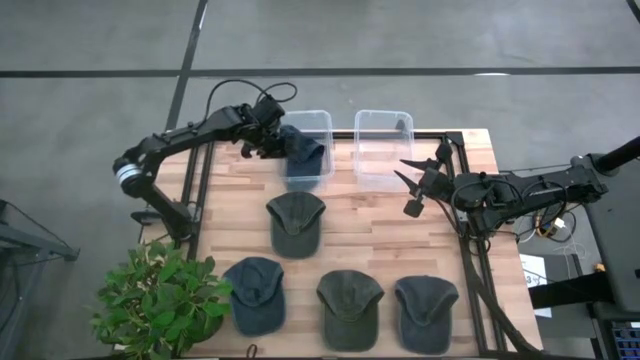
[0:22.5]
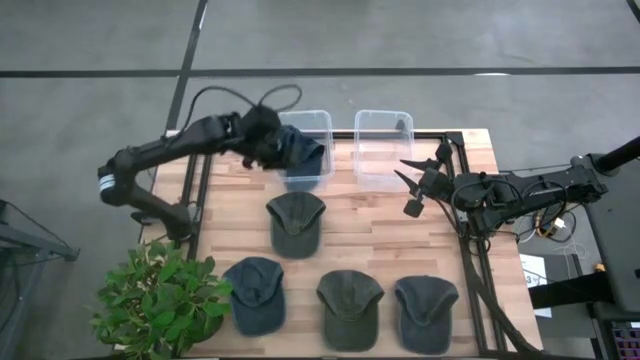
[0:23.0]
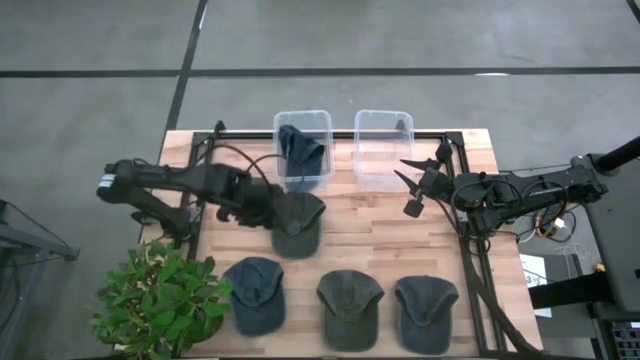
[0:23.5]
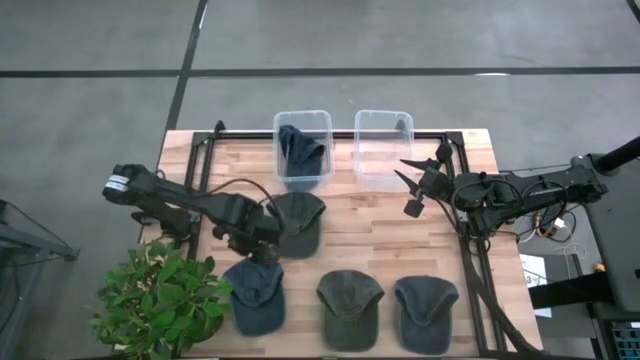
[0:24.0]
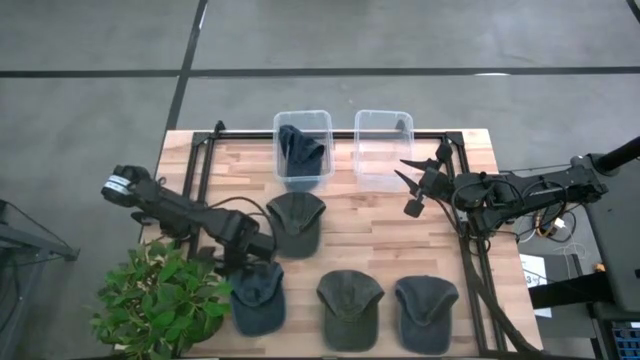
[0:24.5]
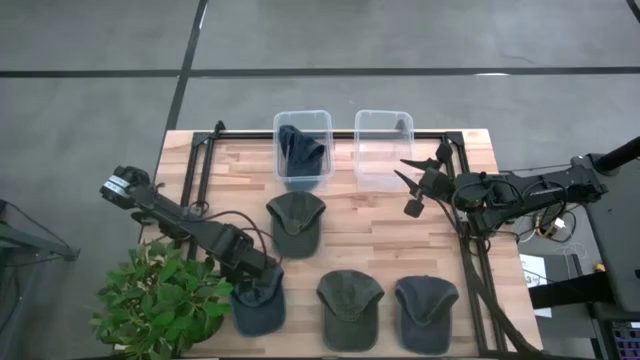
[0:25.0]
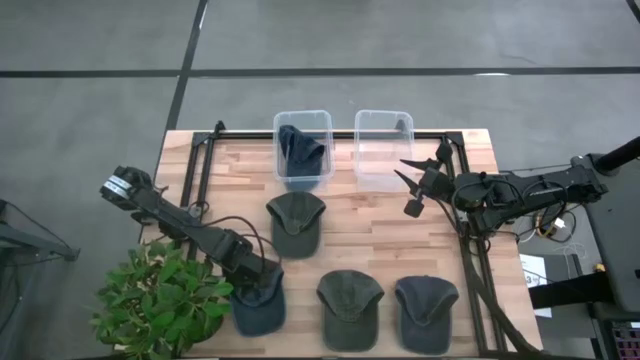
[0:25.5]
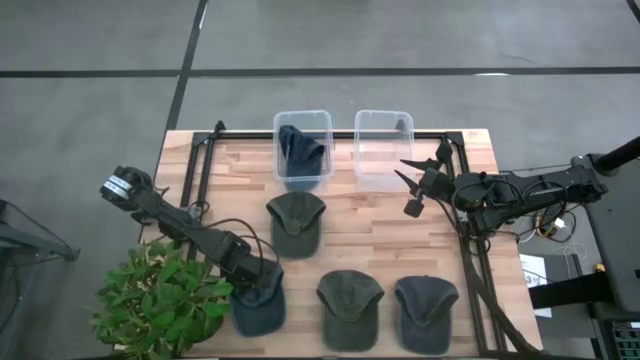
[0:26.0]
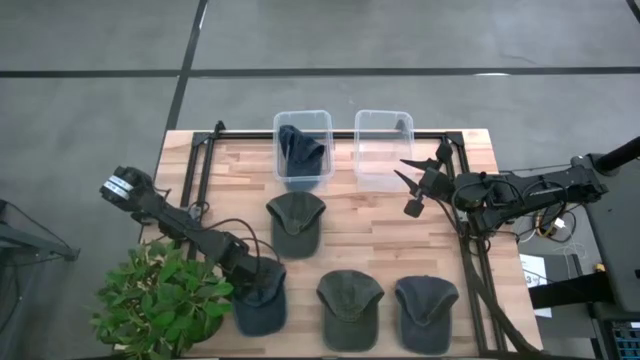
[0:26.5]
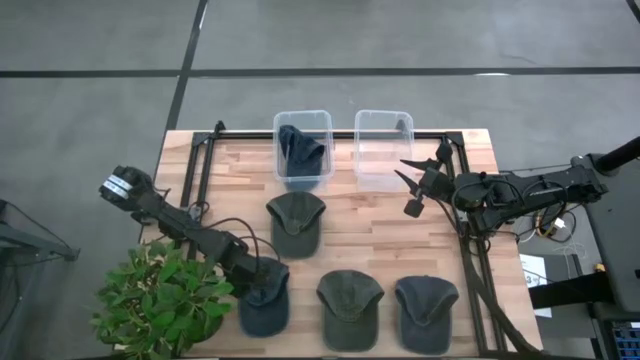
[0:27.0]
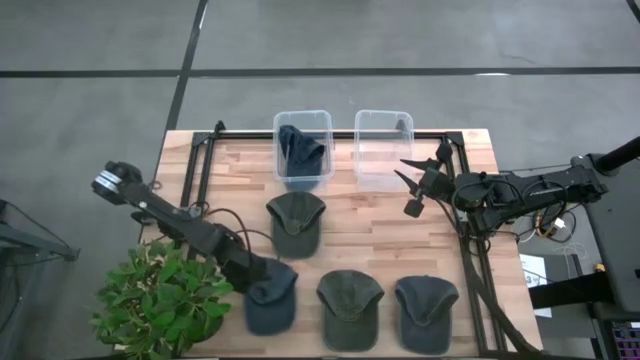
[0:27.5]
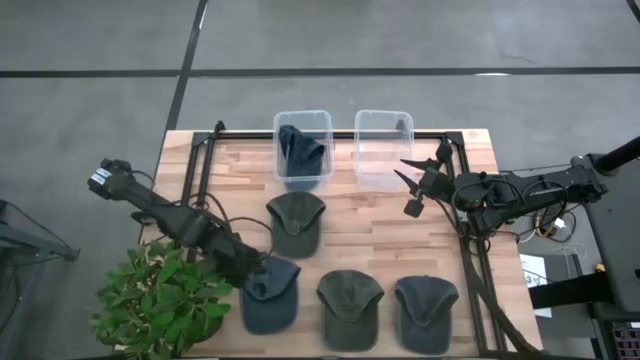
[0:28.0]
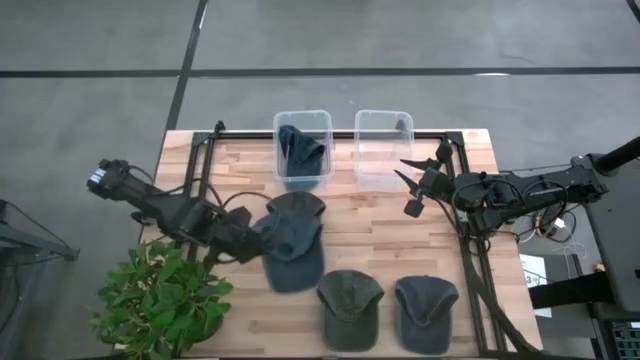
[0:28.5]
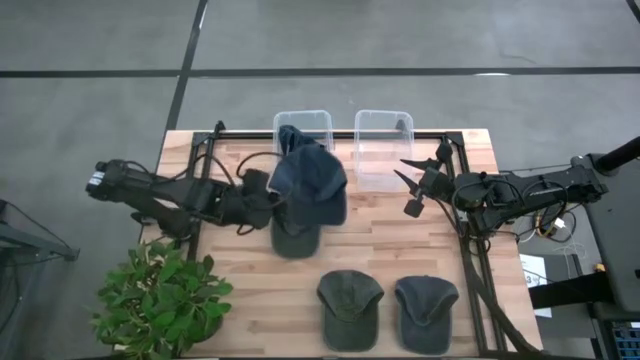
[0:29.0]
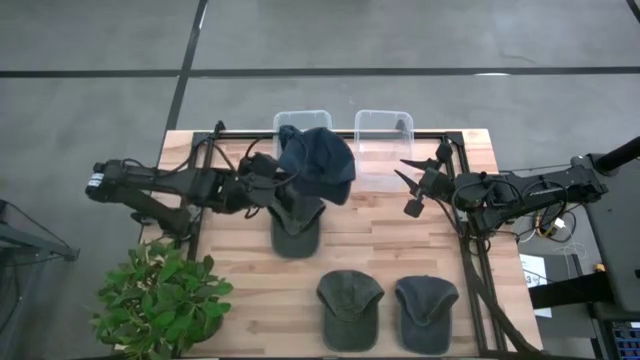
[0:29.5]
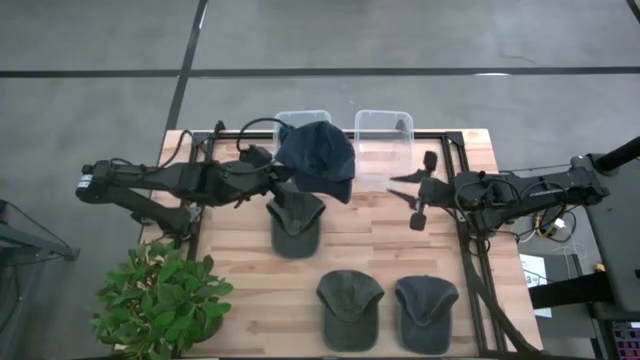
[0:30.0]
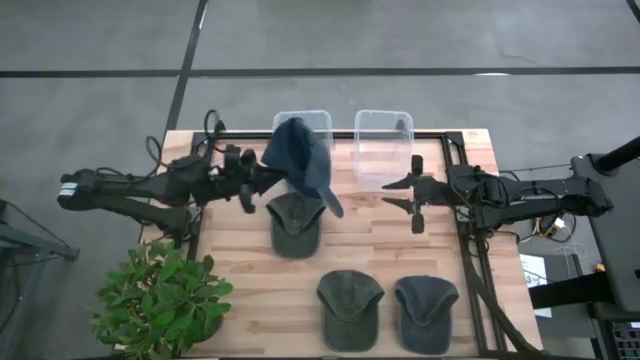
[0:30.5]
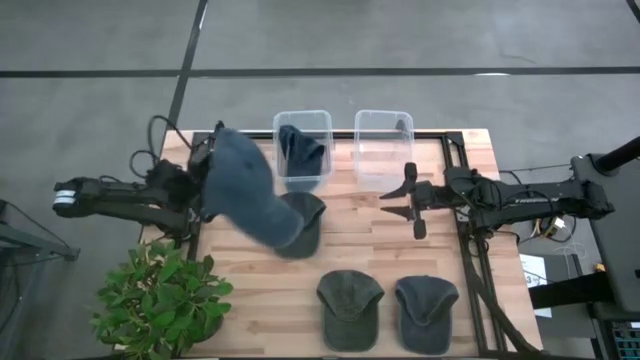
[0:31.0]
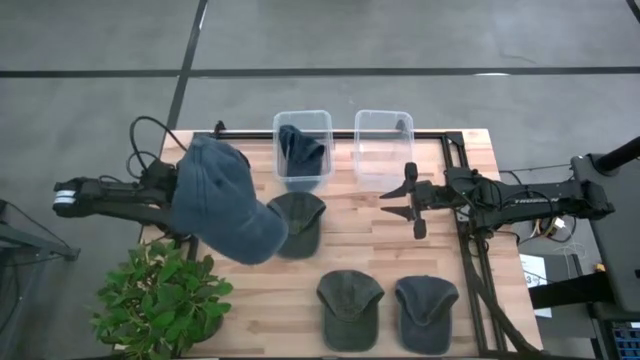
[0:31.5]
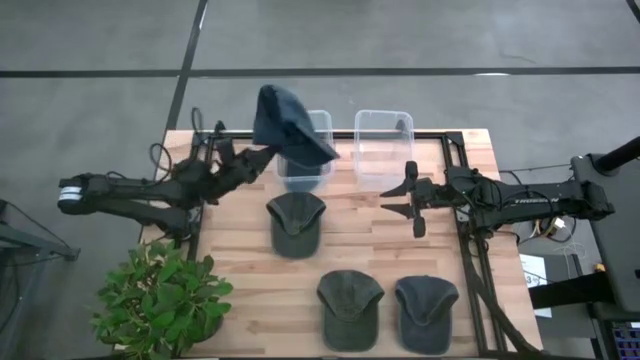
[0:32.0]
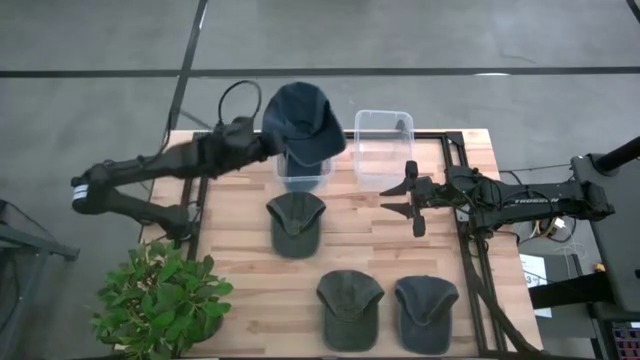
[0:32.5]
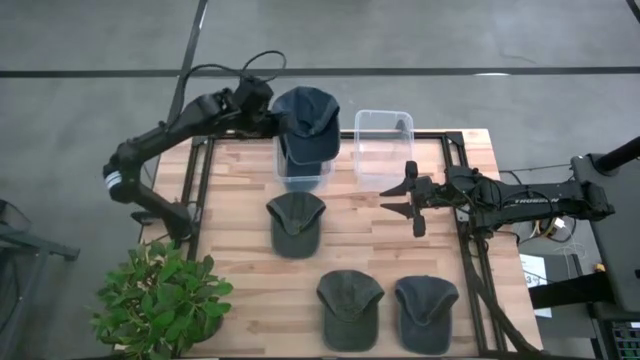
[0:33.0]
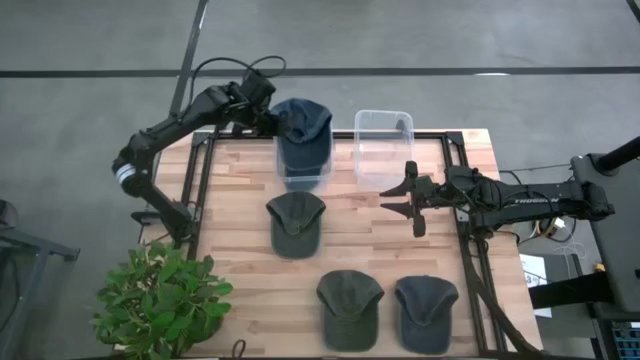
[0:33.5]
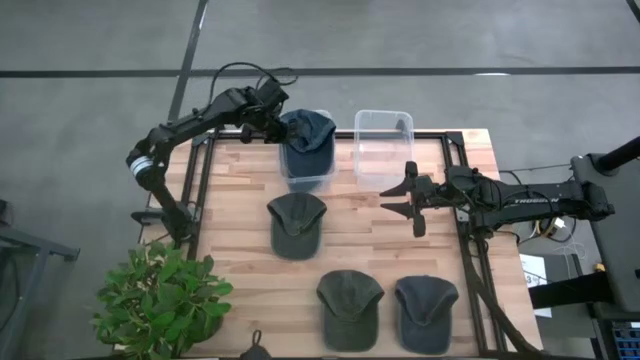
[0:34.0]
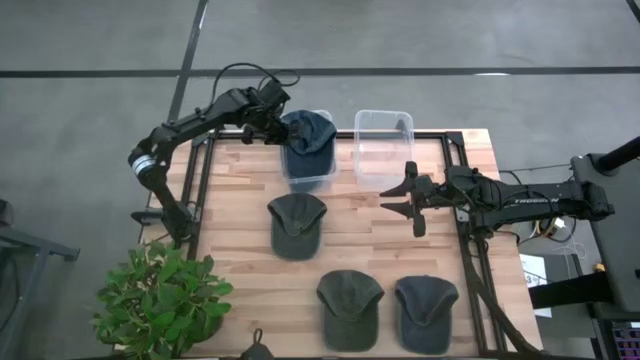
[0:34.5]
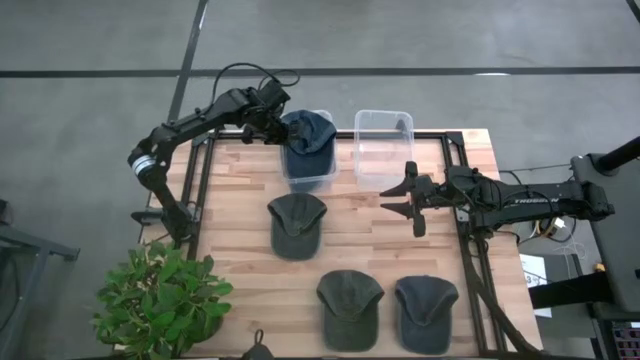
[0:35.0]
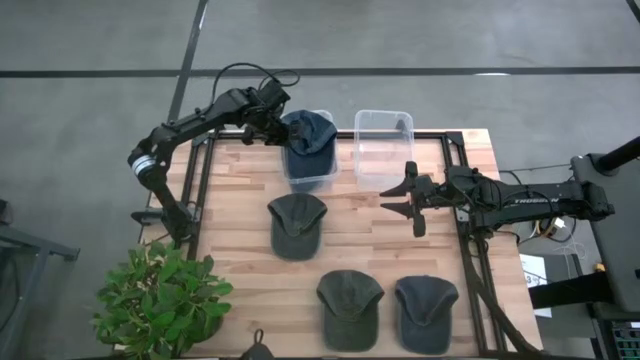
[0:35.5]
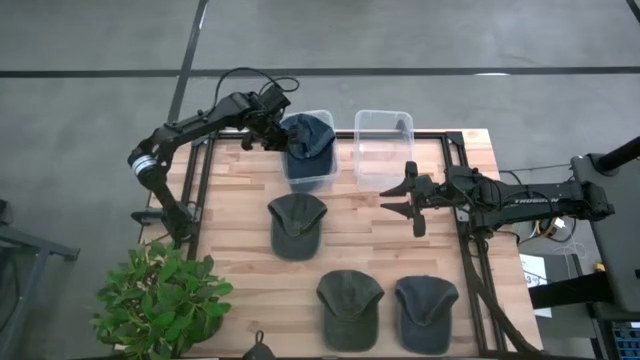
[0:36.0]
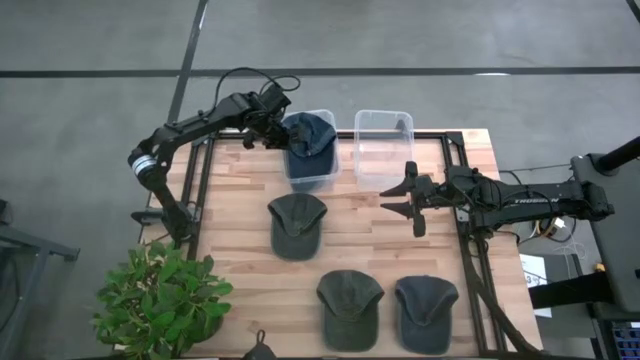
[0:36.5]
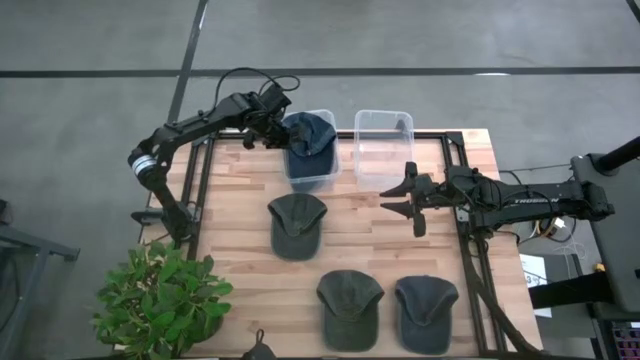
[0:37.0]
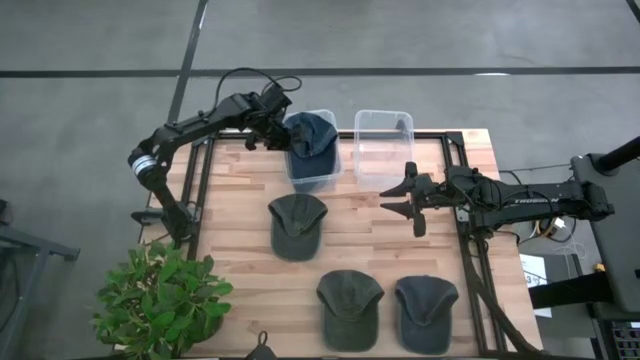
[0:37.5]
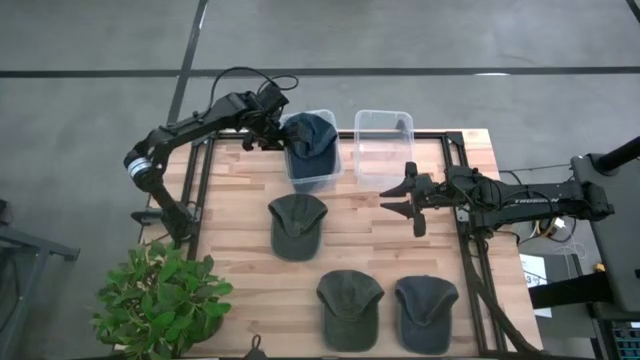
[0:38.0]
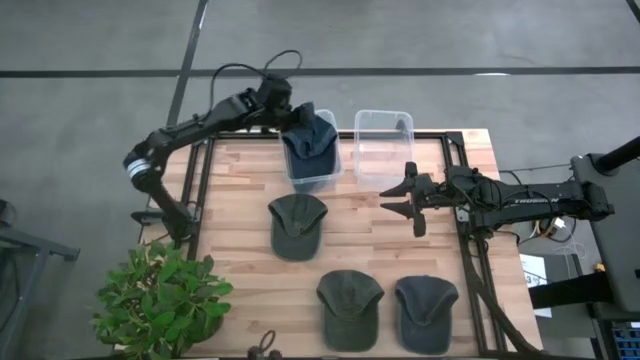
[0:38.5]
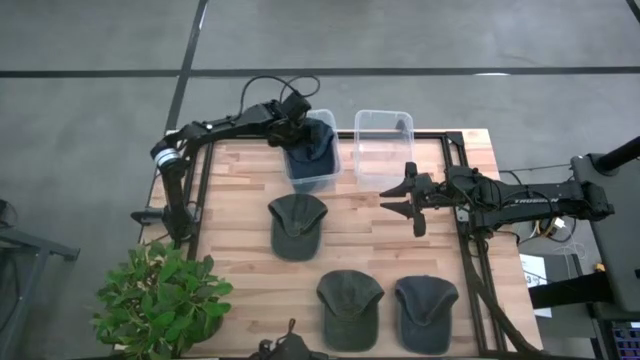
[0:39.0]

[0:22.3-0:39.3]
Task: Pick & Place hat
Put the left blue cap into the left transparent bin

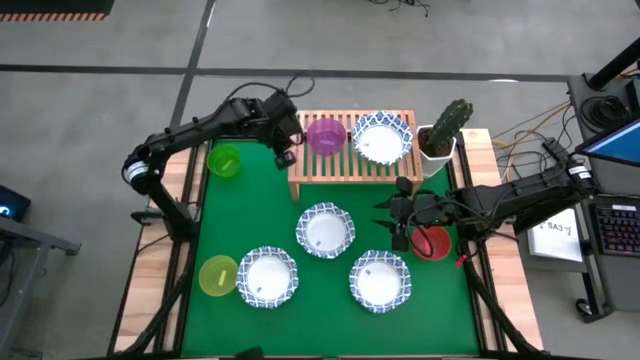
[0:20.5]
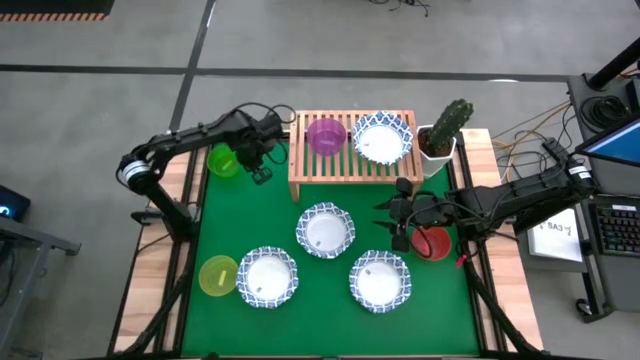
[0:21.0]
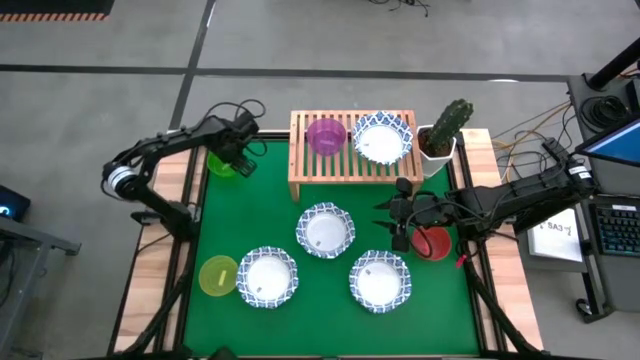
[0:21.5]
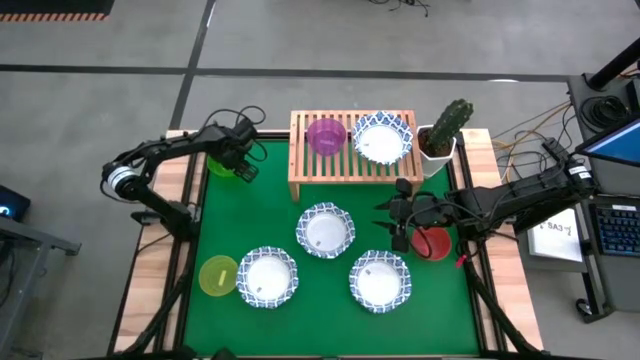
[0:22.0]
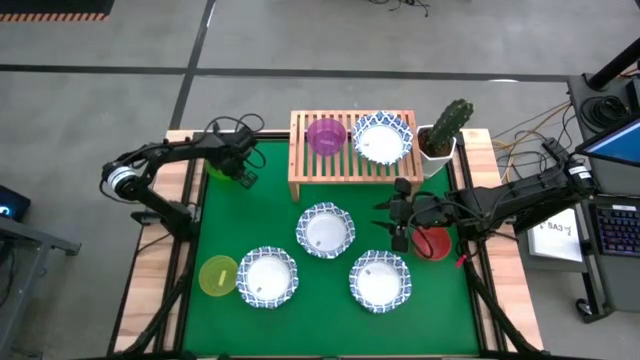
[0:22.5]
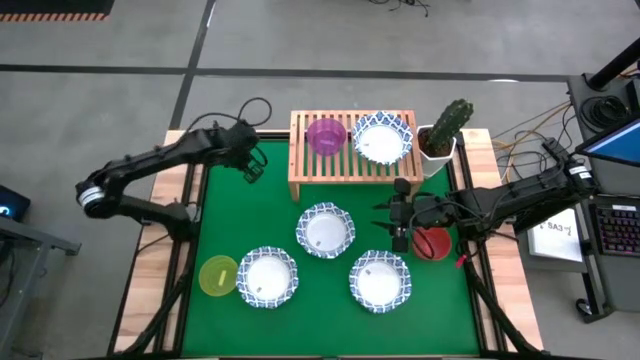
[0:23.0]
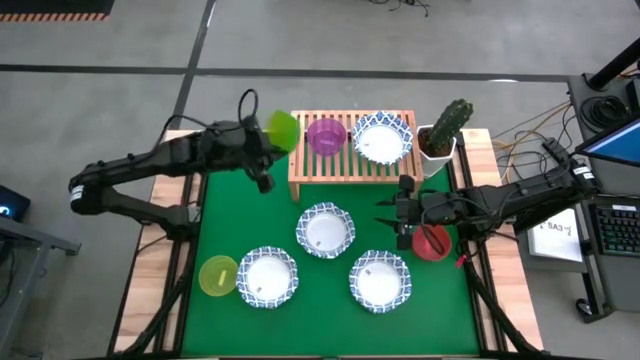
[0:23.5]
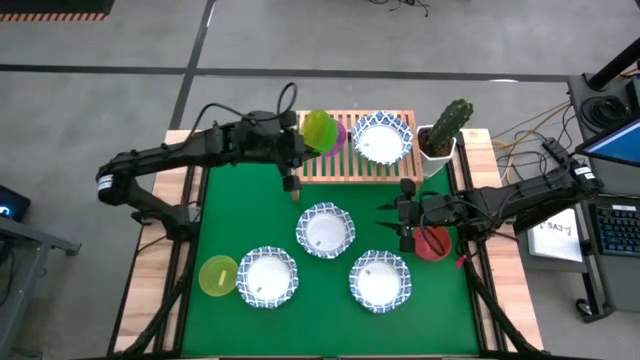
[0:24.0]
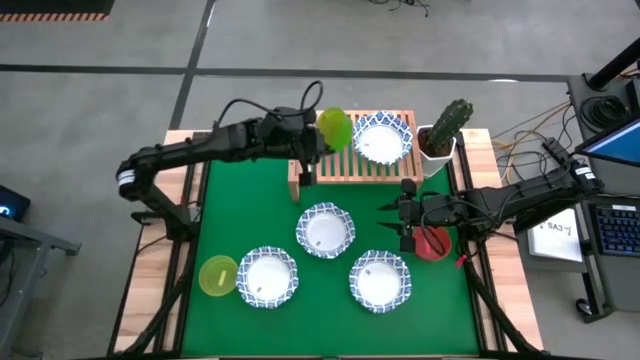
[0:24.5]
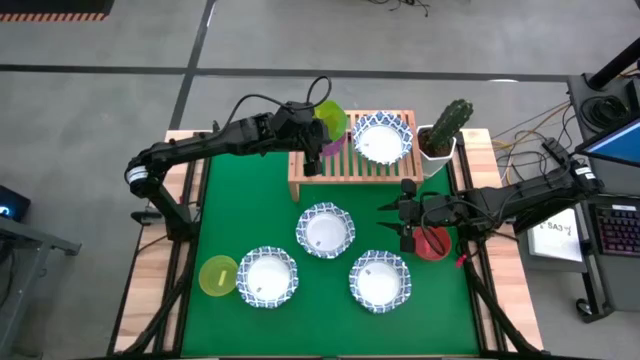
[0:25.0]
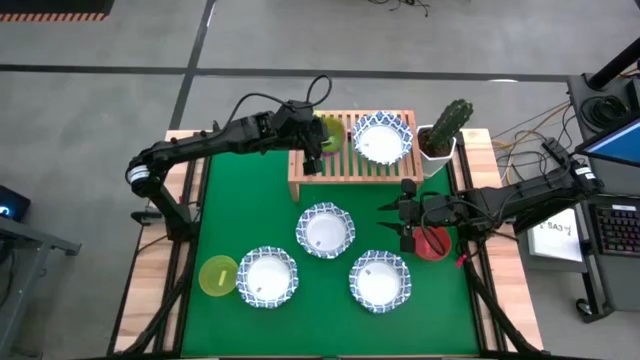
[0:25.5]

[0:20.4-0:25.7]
Task: Place and stack bowls onto a shelf
Stack the small green bowl on the small violet bowl on the shelf
